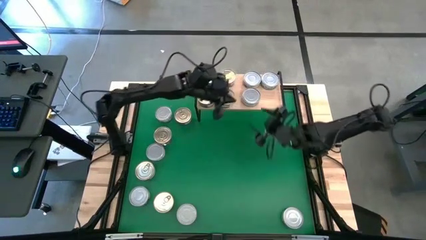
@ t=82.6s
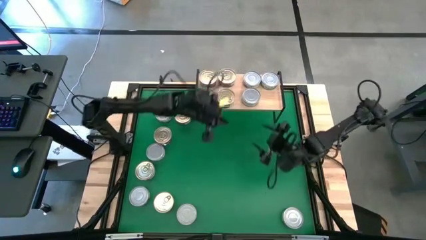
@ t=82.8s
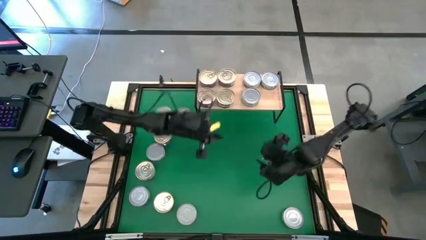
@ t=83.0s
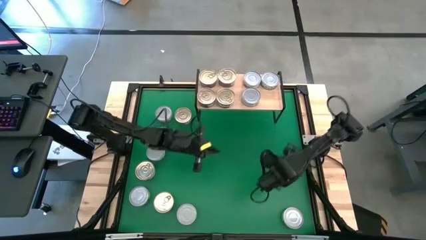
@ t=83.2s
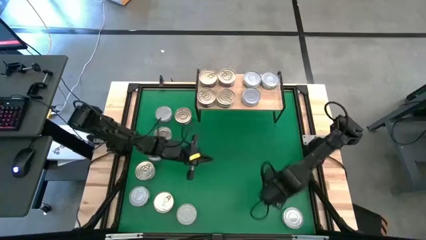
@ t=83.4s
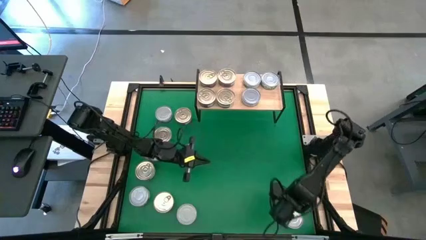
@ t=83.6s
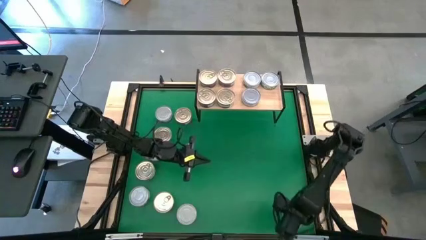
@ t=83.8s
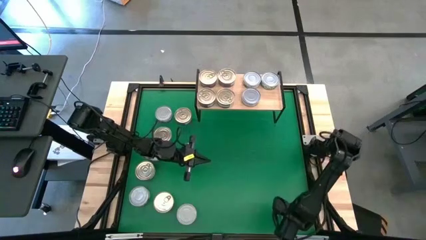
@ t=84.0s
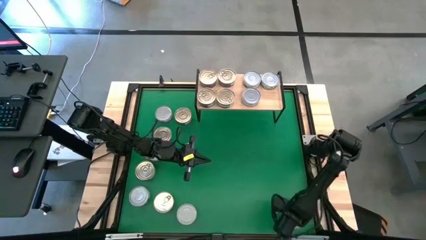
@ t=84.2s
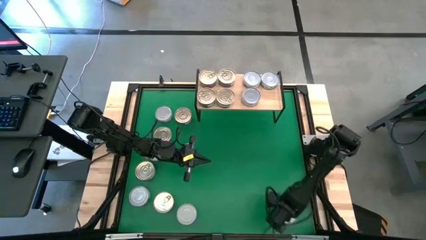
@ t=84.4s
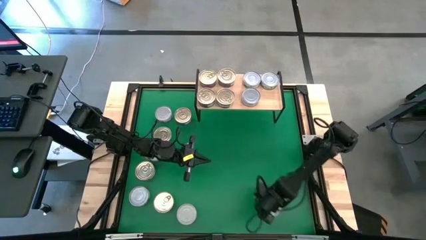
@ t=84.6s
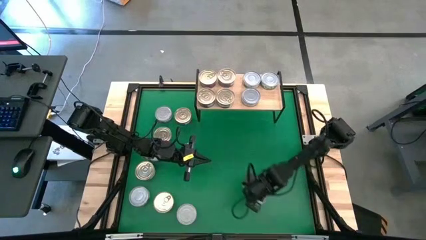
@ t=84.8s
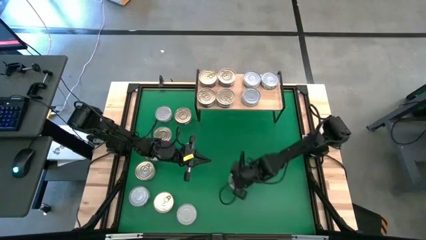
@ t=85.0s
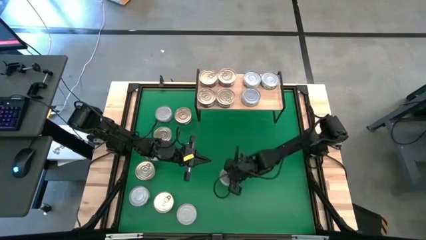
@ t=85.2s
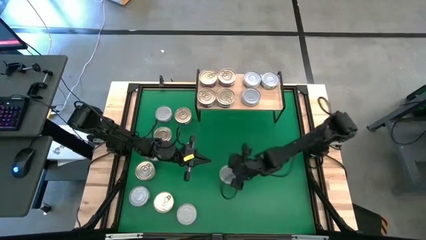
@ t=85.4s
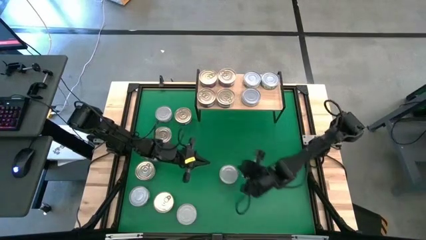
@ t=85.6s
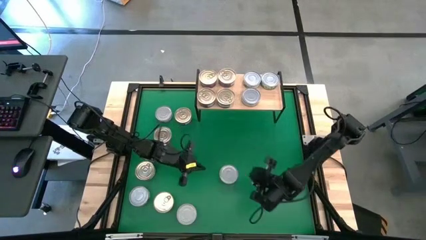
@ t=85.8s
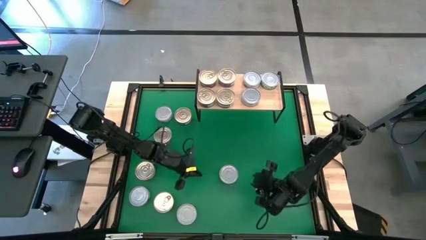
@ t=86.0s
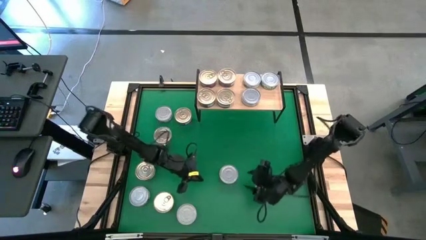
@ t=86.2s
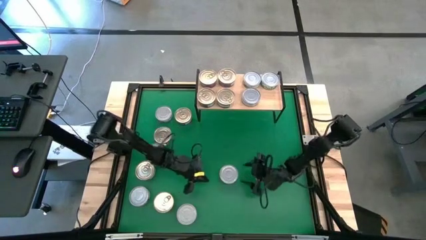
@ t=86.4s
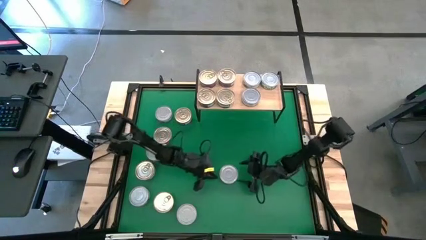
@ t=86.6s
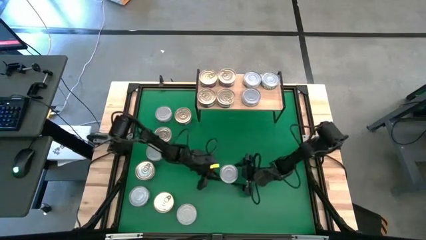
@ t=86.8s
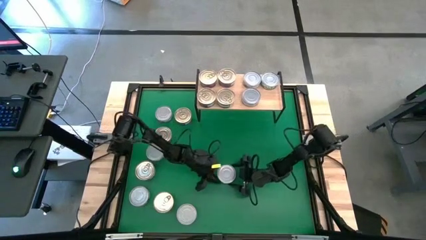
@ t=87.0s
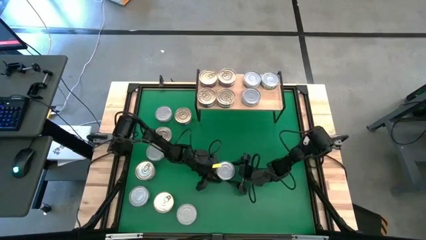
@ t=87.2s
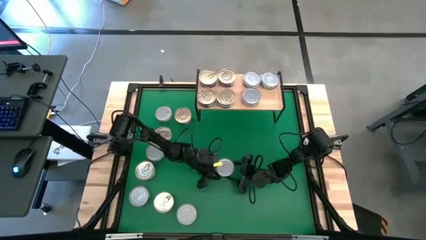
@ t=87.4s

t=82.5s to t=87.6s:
Task: Stack canned seafood by type on shelf
Put the green tuna can on the shelf and aligned with the top right green tuna can

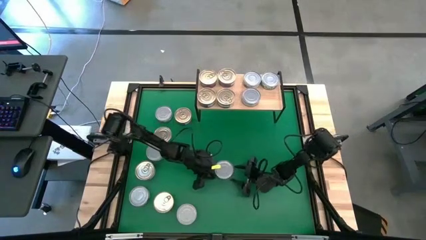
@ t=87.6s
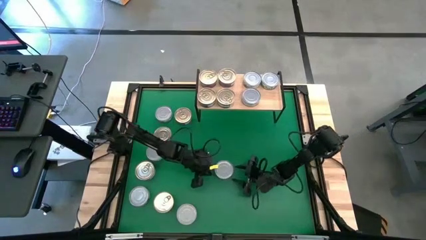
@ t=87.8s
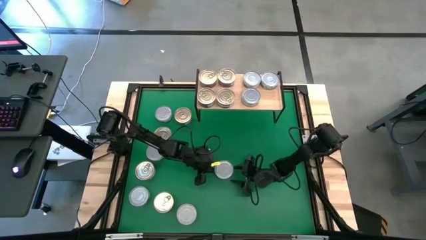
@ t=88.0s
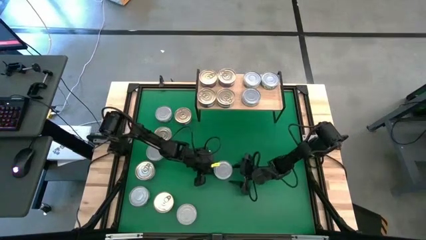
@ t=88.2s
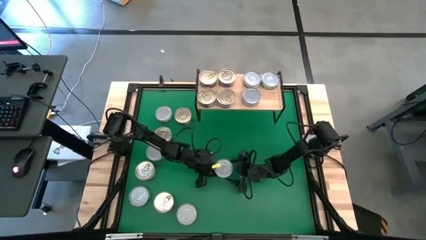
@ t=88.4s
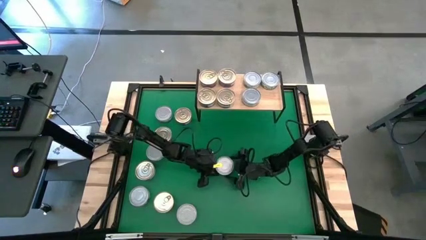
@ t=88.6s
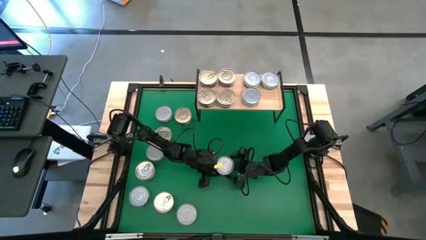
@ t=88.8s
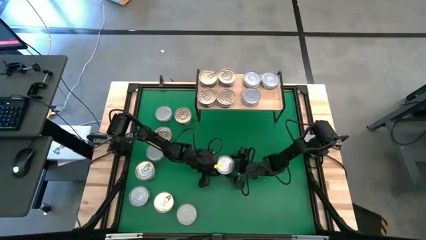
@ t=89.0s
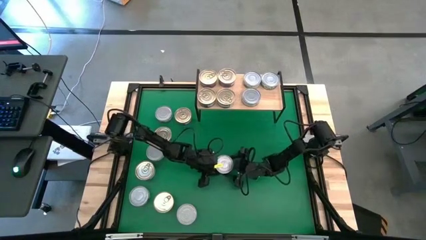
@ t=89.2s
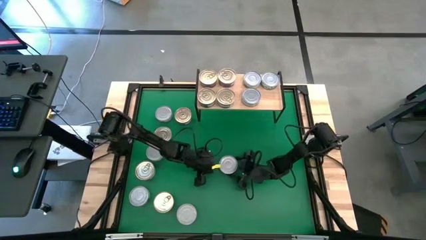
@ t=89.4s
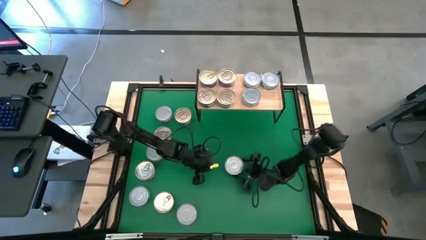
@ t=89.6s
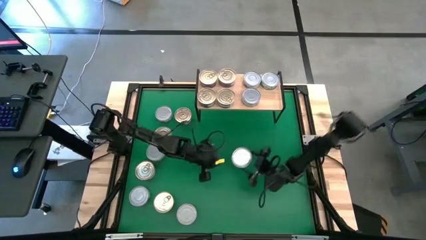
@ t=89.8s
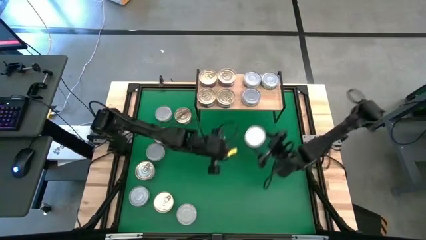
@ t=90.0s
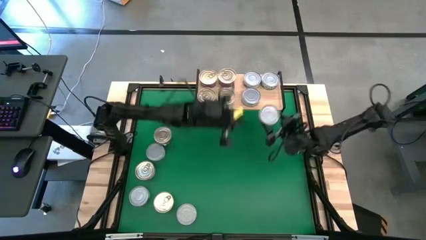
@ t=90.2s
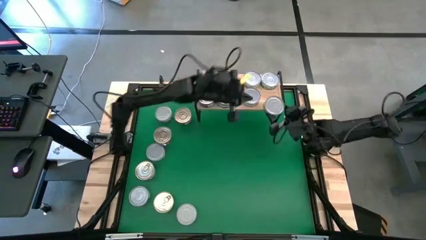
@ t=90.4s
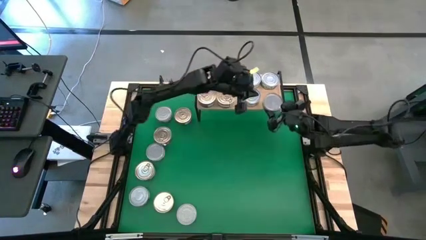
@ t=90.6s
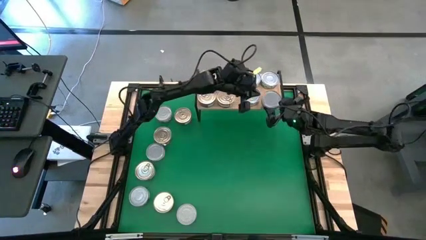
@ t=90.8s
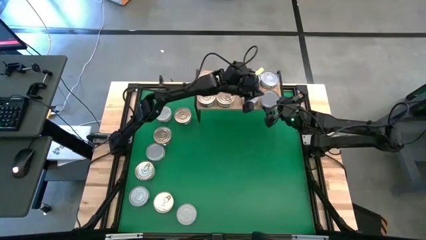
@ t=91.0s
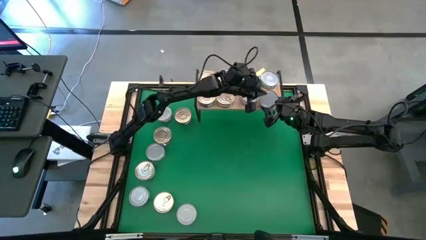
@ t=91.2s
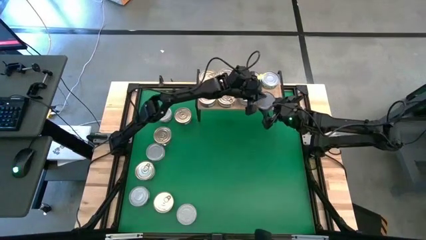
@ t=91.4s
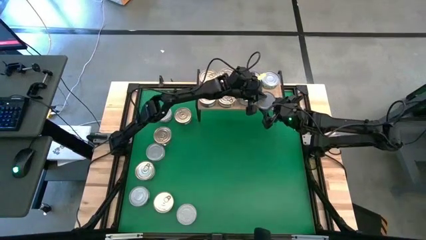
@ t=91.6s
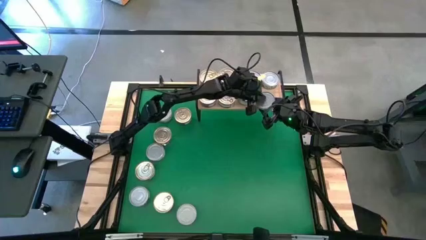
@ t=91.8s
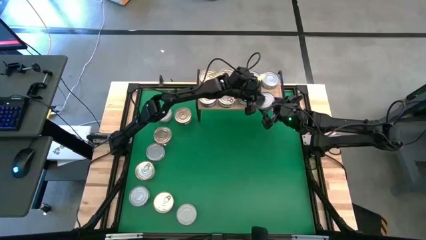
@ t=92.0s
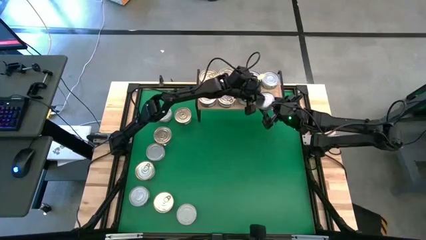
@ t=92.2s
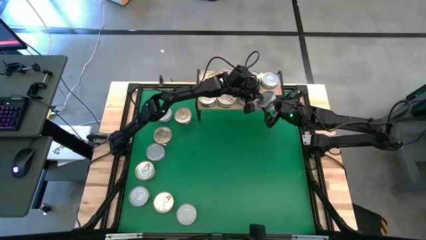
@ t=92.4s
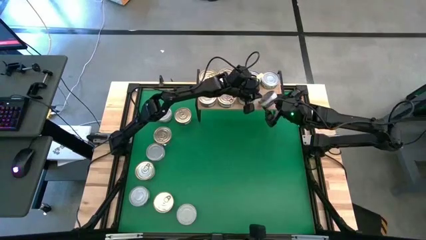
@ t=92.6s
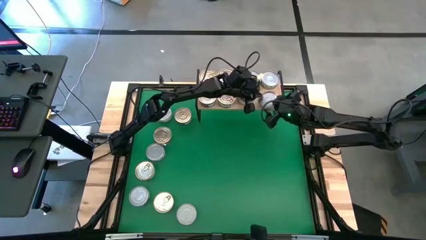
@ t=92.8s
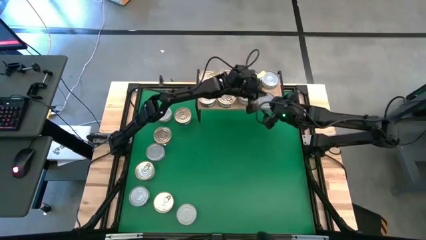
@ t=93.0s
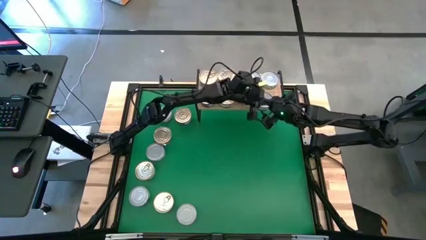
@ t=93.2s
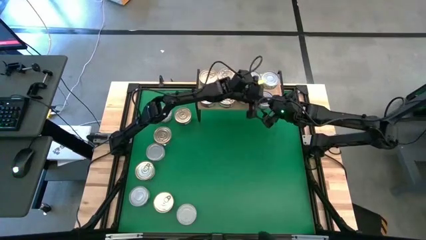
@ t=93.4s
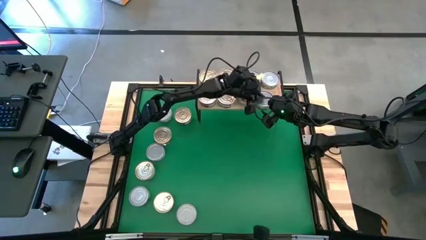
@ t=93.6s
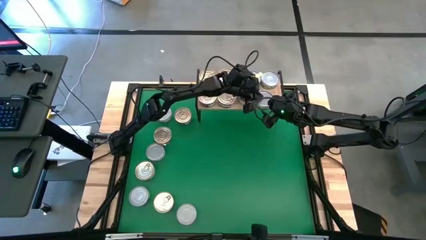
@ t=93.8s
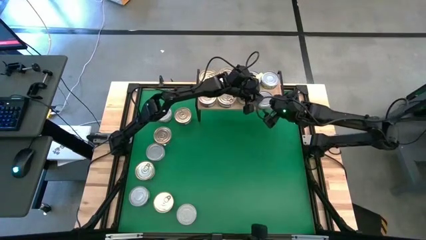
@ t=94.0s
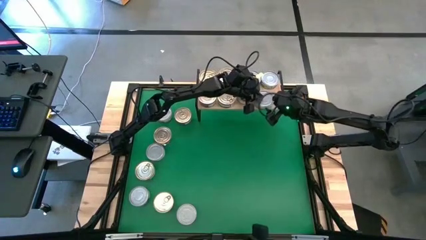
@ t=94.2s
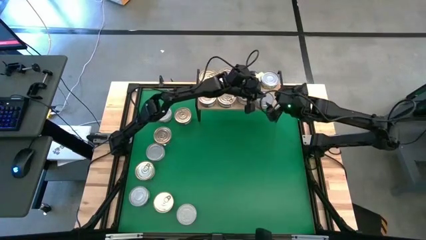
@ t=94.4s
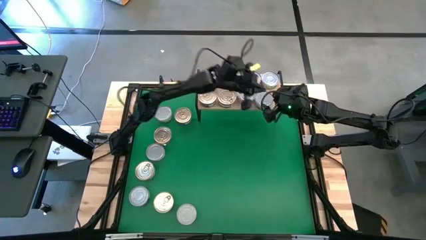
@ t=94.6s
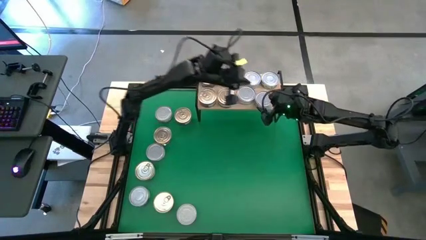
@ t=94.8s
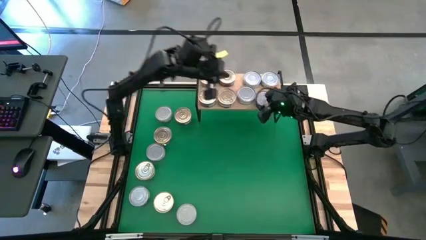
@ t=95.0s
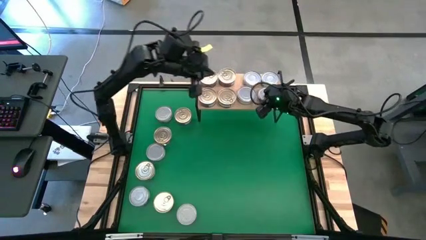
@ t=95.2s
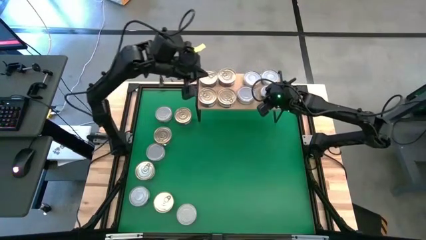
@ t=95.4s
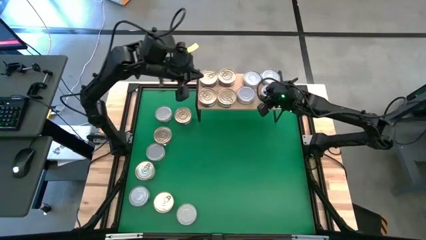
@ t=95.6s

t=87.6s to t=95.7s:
Put the green tuna can on the shelf and aligned with the top right green tuna can

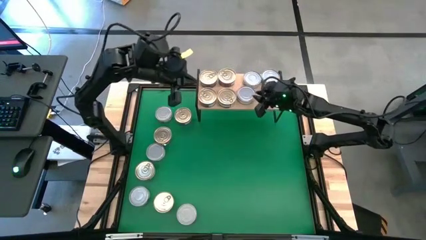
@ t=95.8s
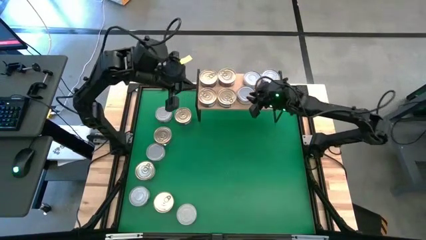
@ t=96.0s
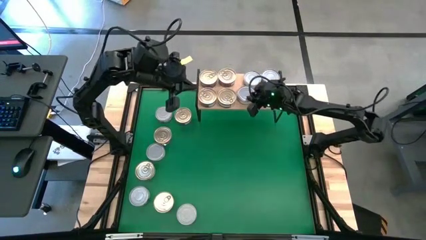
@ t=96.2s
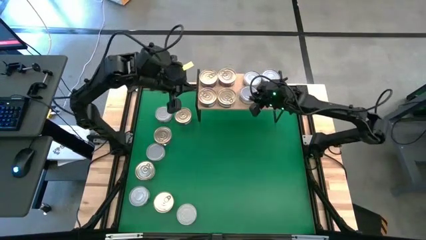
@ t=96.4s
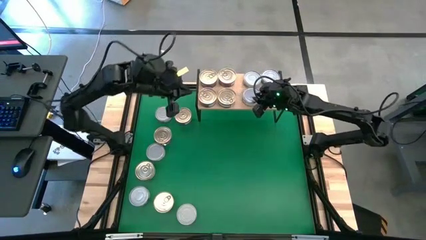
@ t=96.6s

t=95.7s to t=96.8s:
Adjust the bottom left green tuna can on the shelf

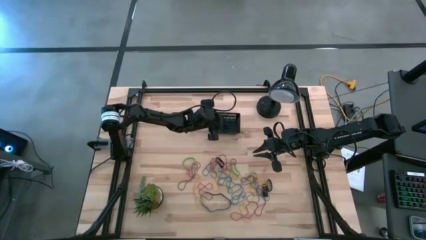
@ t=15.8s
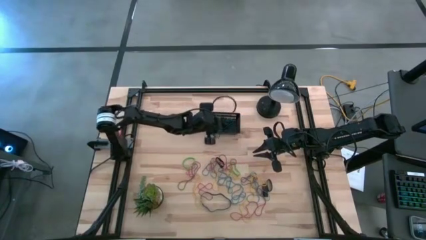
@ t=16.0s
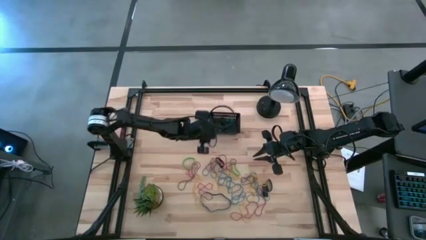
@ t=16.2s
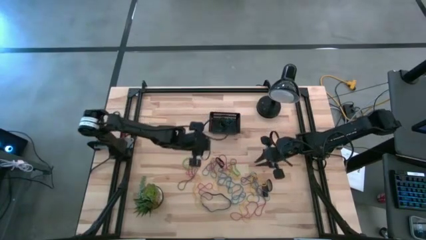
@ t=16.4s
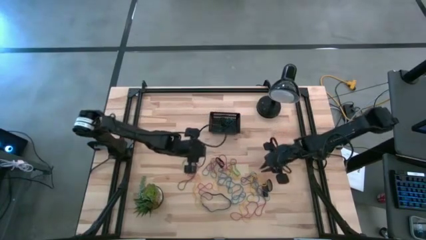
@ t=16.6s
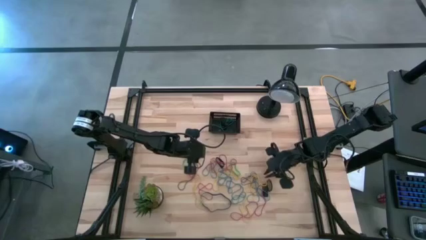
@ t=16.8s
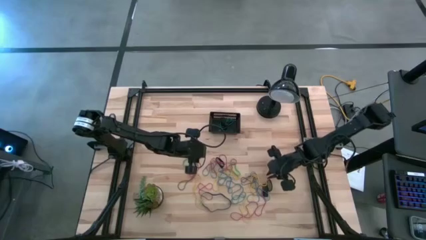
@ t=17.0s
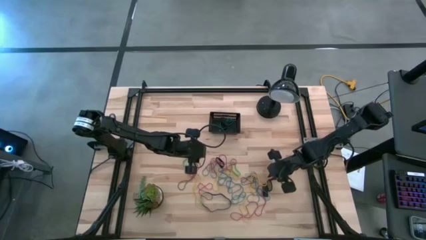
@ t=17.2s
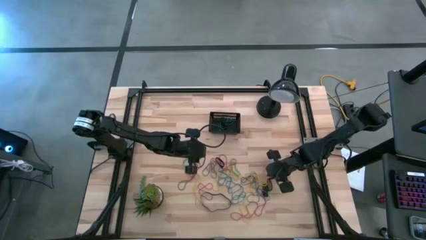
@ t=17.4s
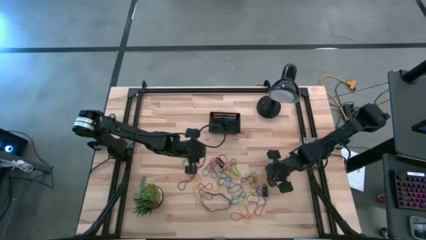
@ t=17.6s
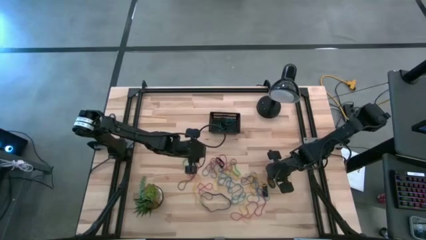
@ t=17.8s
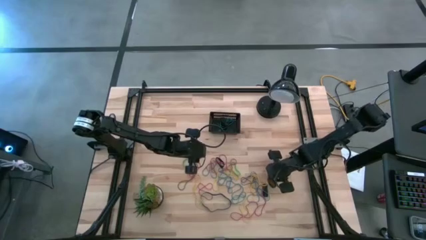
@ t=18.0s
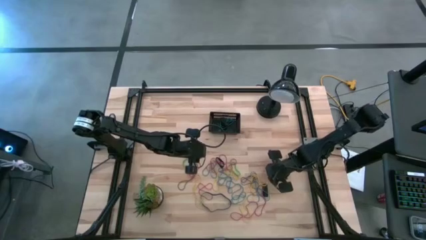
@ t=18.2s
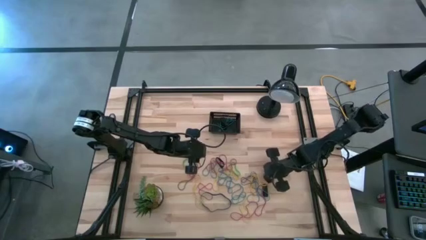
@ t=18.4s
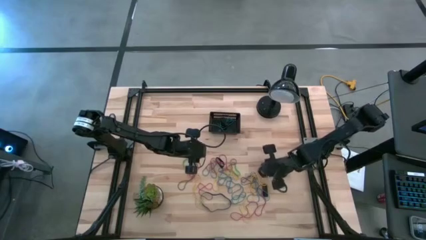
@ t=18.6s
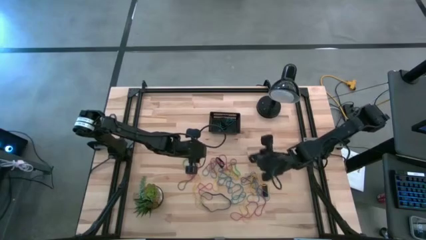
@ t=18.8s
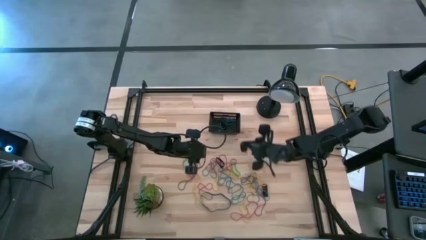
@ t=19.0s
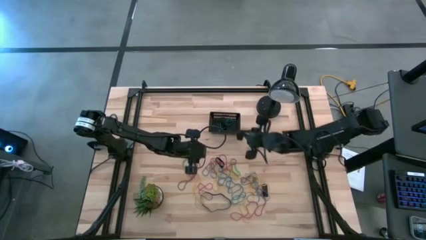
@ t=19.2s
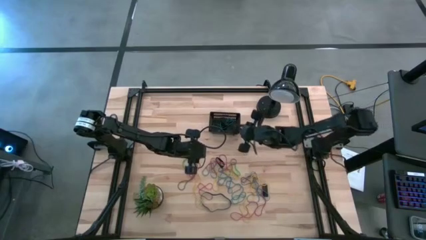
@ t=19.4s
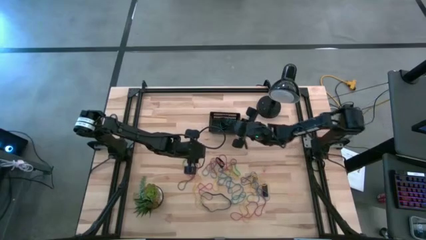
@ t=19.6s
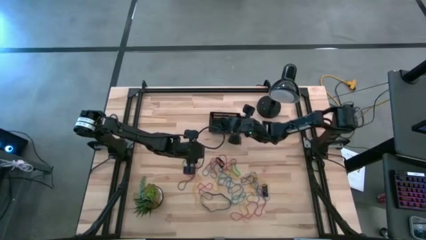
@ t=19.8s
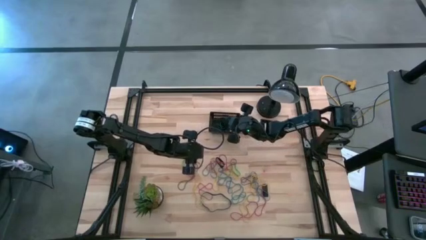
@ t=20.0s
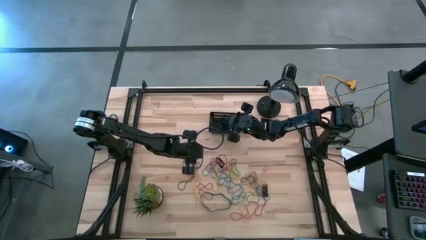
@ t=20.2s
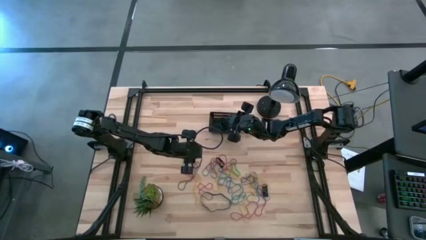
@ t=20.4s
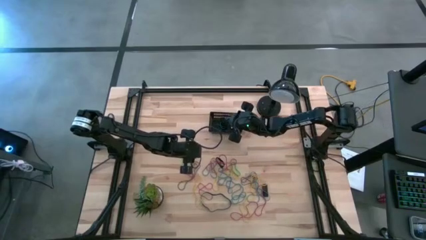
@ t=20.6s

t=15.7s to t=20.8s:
Task: Pick and place rubber bands into bin
Put the black rubber band into the basket
